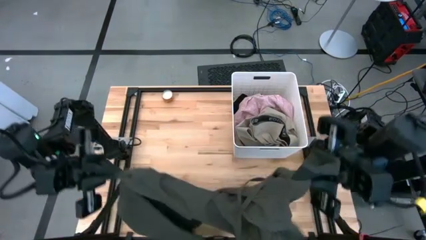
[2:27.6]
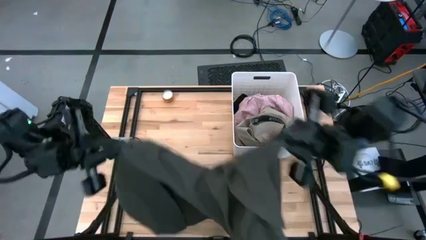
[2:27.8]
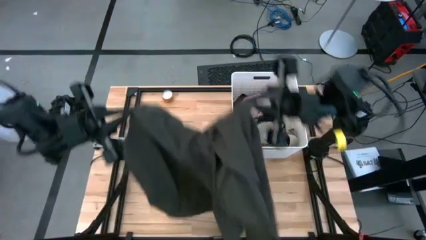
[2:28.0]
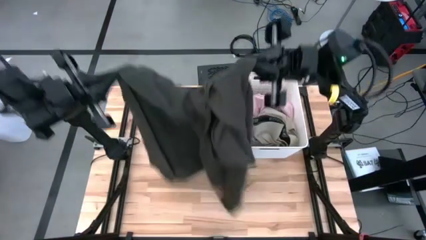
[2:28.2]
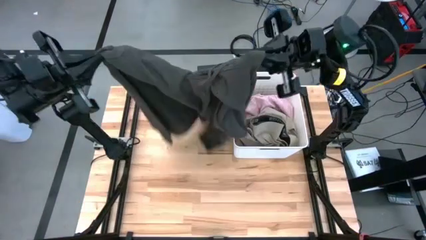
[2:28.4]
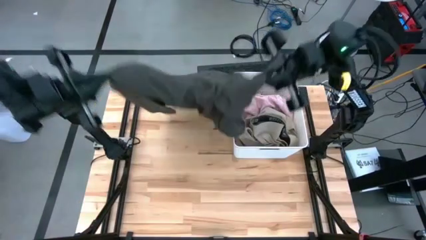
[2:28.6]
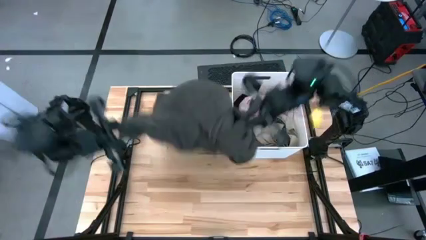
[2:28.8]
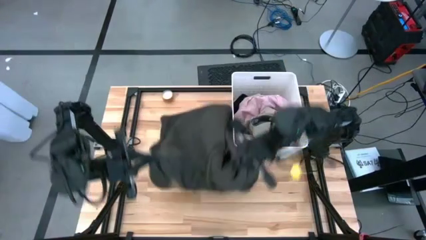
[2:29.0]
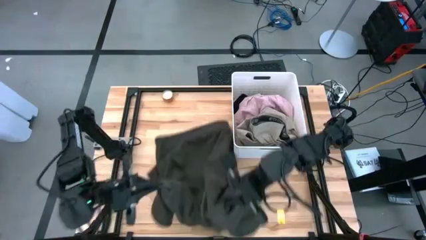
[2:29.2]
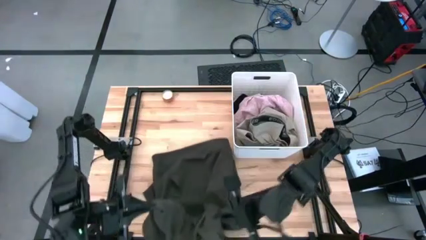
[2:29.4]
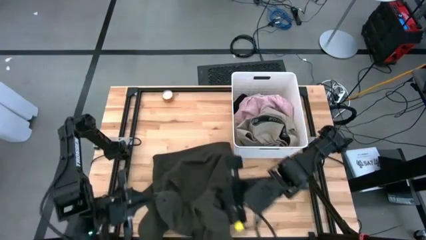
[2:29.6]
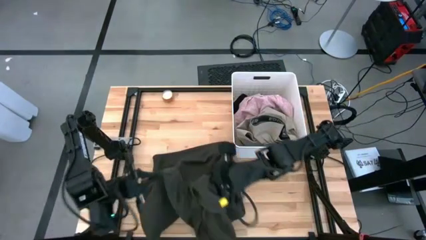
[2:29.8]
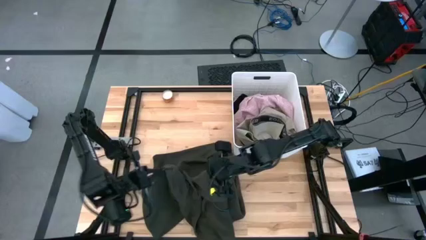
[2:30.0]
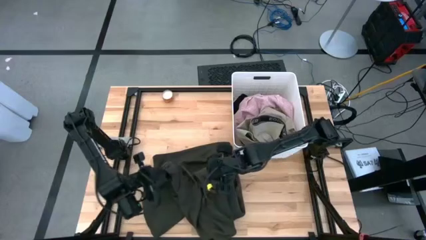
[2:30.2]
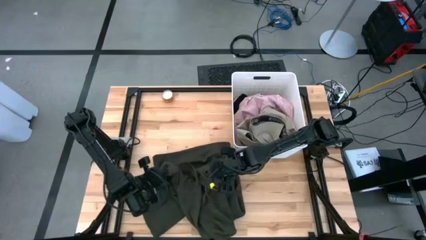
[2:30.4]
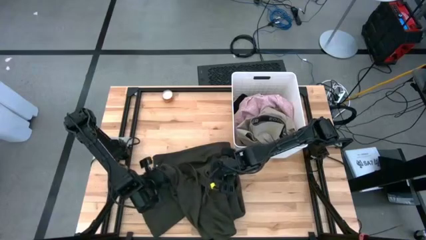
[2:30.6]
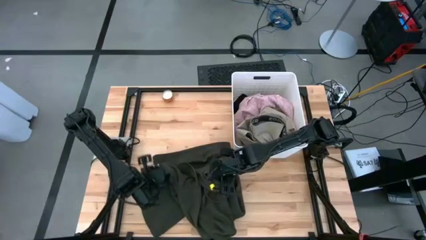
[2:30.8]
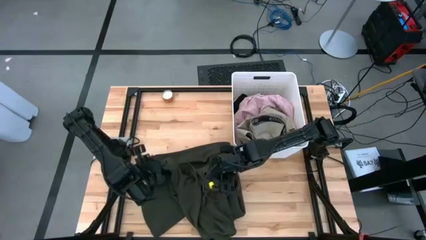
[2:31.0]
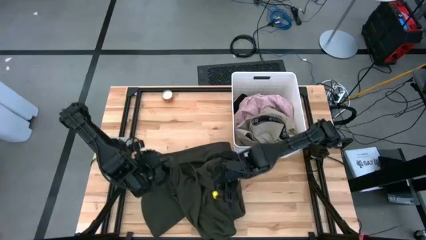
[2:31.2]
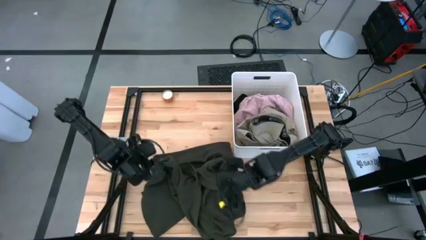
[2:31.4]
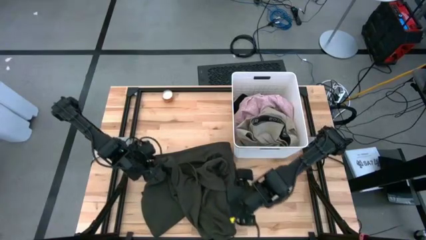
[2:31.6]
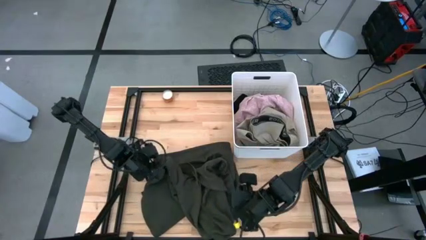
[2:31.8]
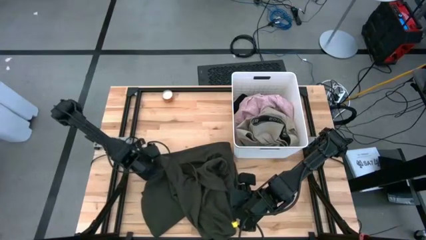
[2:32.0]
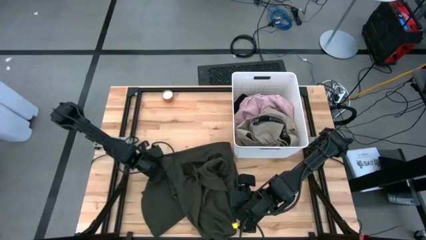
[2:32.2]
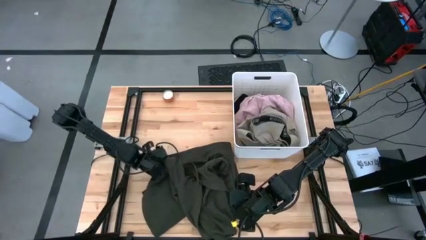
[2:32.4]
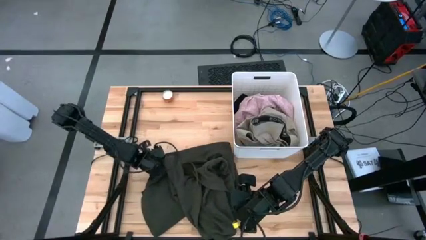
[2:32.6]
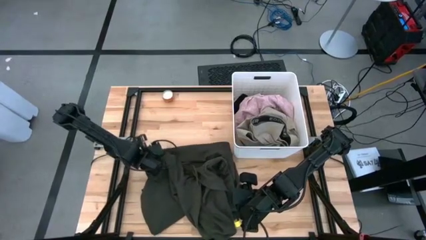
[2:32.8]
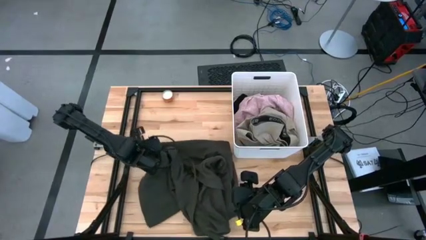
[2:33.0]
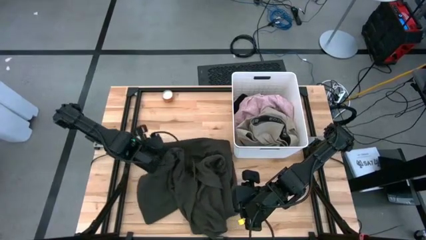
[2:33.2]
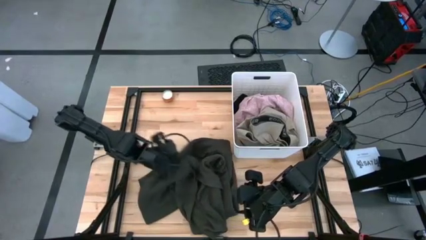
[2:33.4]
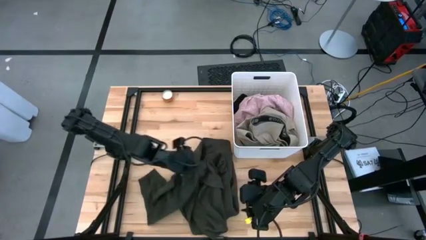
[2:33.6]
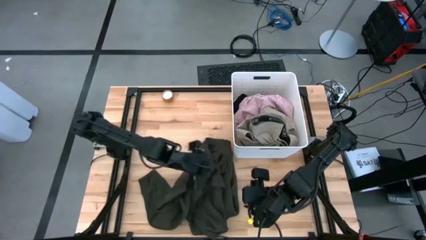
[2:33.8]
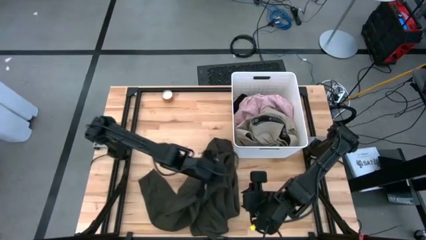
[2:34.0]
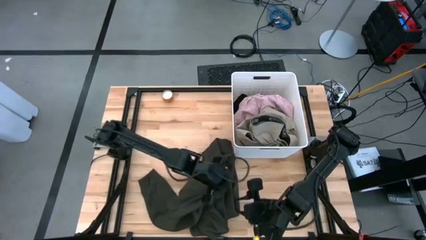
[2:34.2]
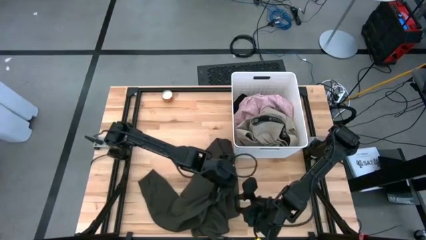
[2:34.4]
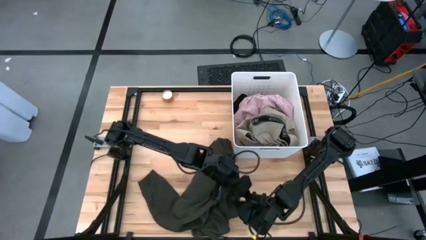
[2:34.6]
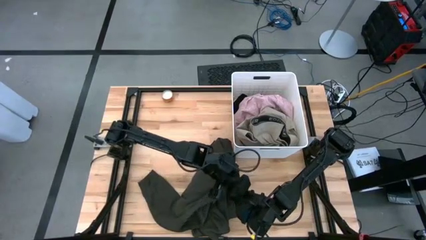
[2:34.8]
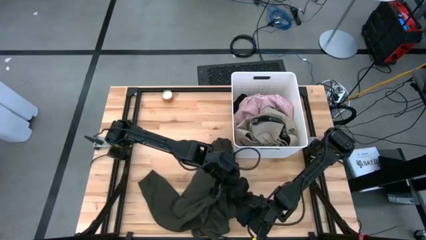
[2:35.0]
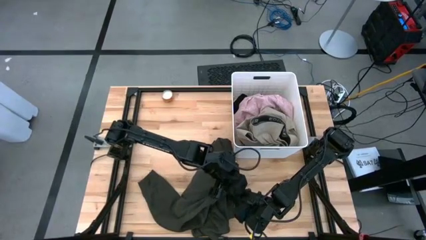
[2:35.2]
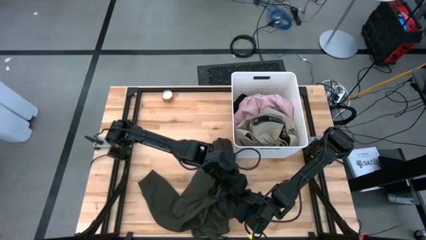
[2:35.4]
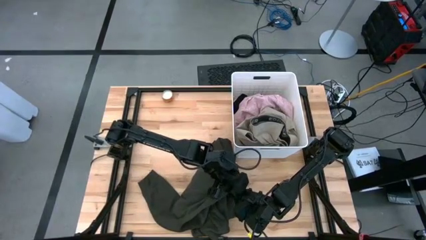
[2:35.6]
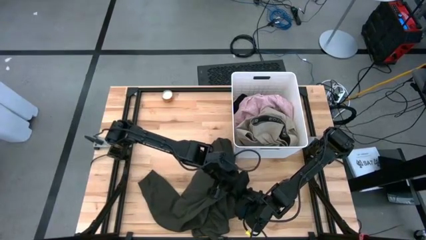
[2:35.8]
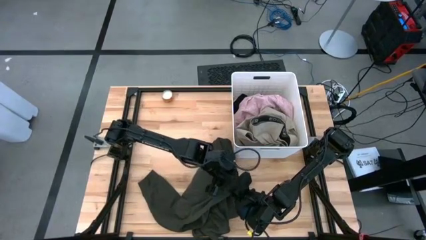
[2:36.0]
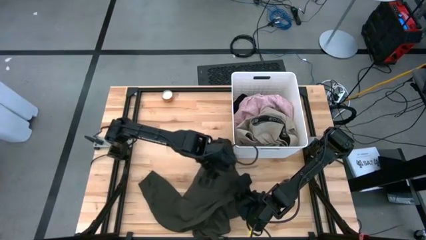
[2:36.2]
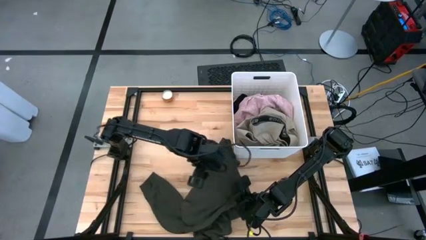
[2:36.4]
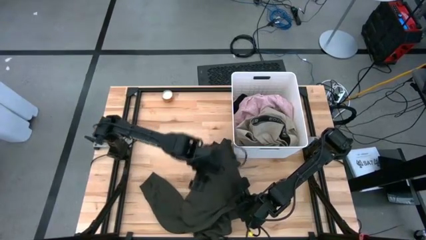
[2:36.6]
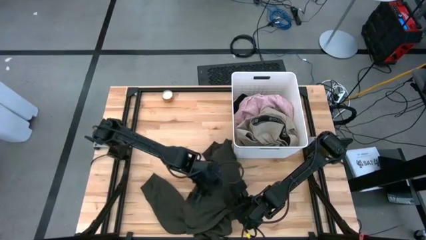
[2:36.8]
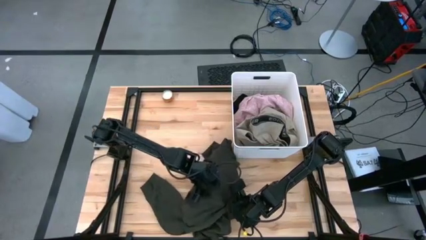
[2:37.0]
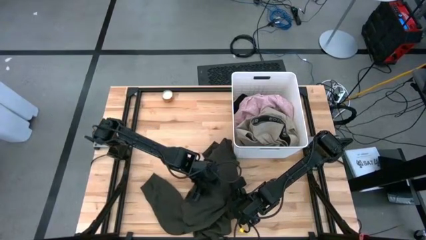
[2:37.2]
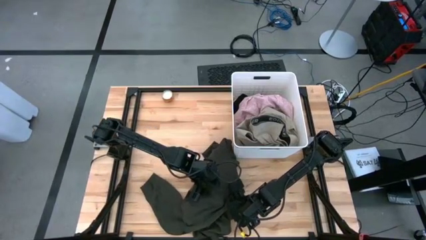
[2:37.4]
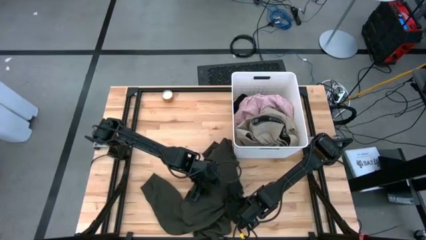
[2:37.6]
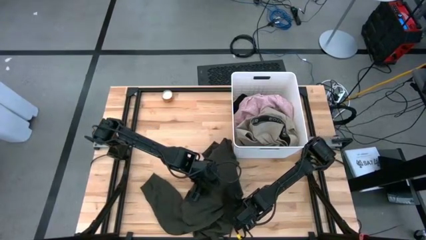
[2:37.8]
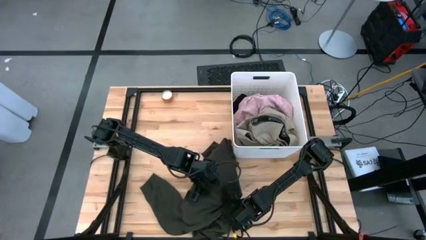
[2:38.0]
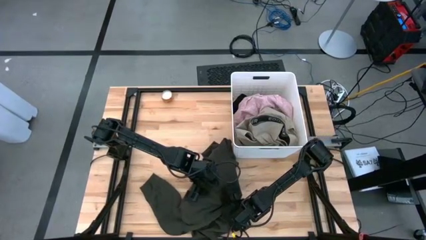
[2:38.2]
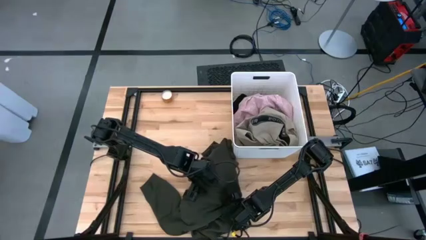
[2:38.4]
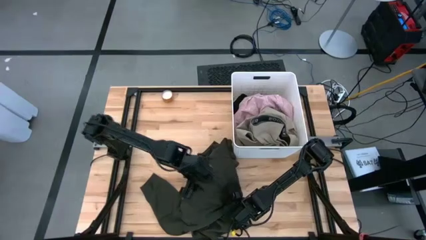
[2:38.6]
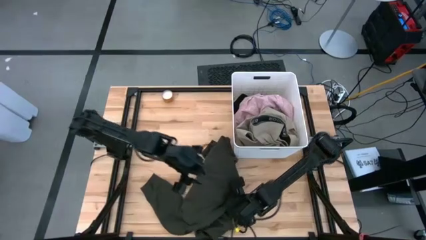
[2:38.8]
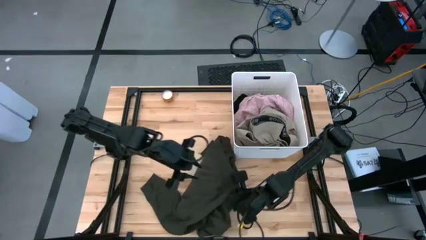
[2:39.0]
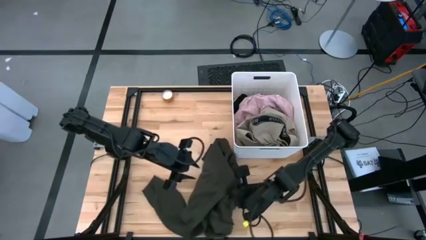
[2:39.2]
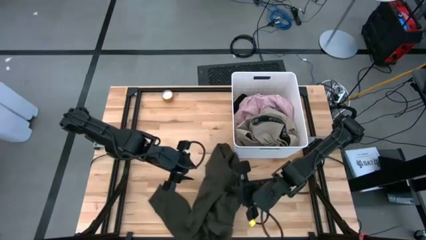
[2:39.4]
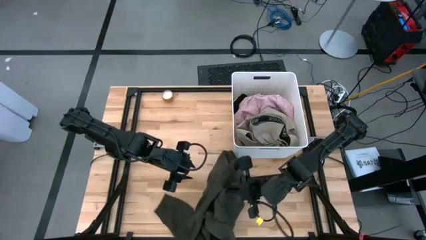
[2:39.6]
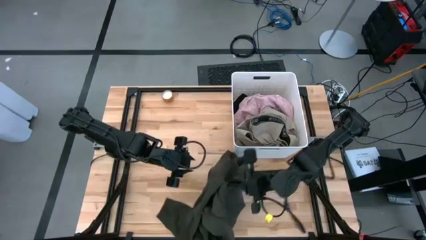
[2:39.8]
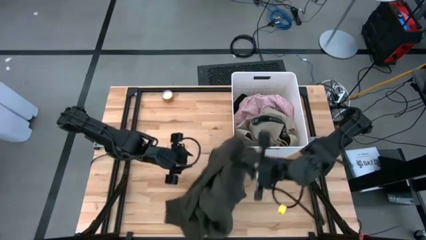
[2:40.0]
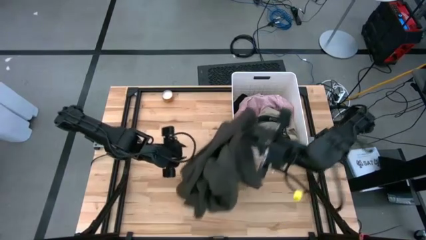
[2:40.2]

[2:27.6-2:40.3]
Task: Sort clothes
Put the black jacket into the laundry bin

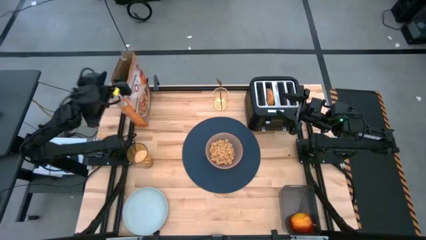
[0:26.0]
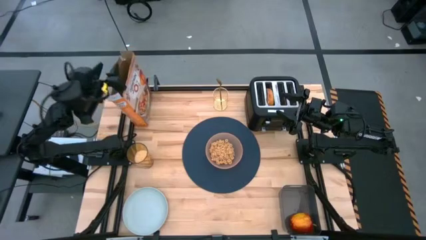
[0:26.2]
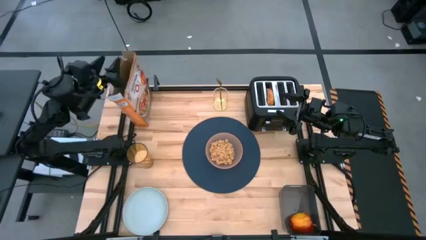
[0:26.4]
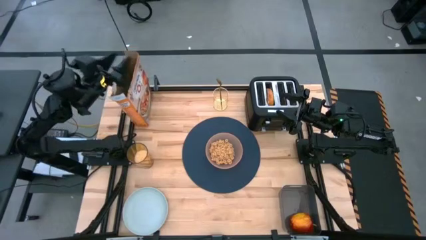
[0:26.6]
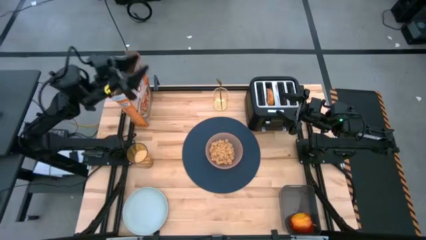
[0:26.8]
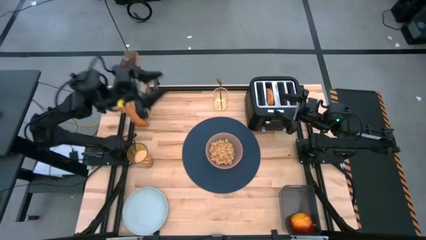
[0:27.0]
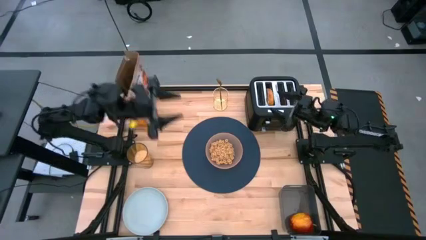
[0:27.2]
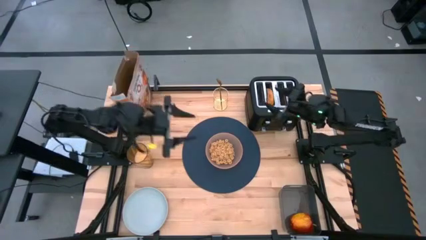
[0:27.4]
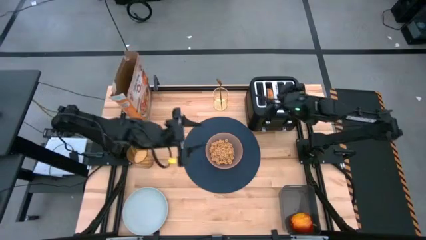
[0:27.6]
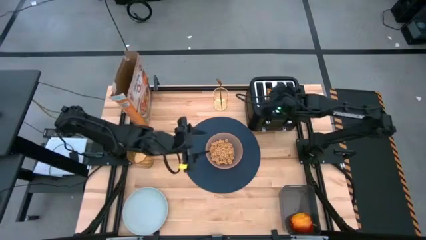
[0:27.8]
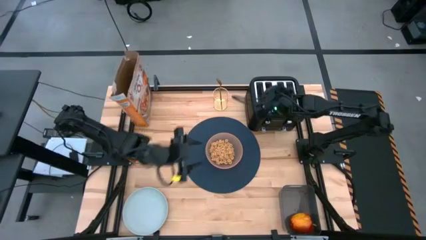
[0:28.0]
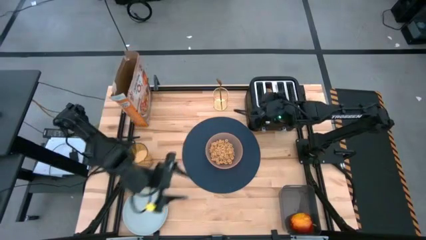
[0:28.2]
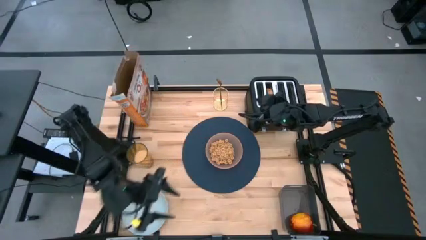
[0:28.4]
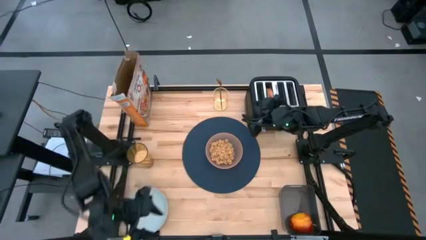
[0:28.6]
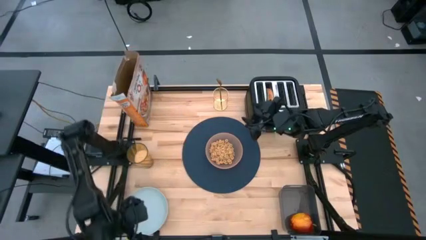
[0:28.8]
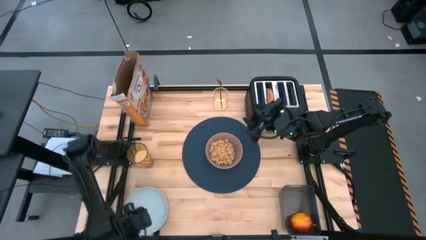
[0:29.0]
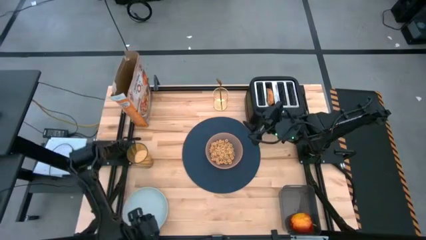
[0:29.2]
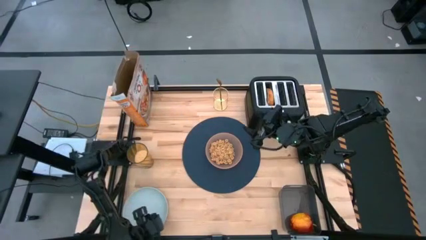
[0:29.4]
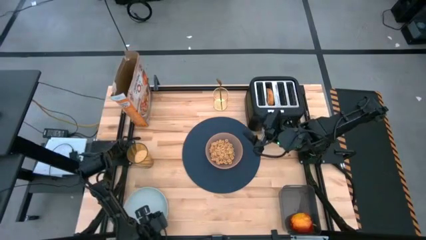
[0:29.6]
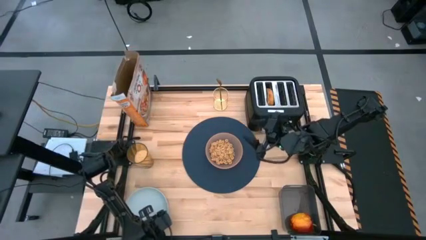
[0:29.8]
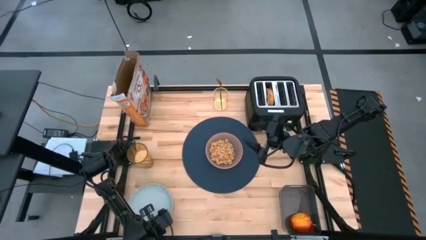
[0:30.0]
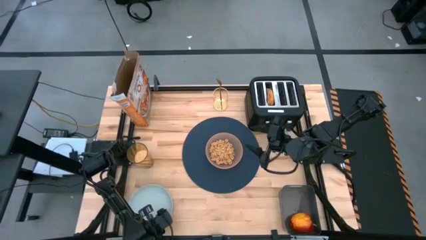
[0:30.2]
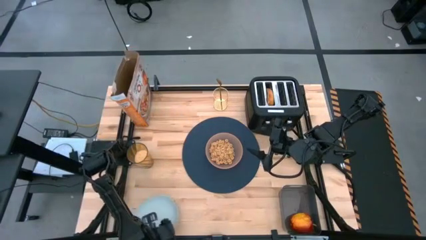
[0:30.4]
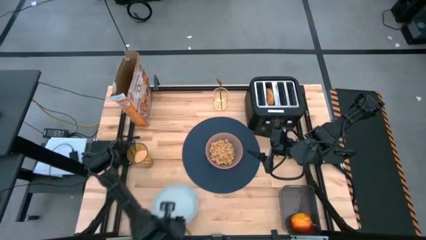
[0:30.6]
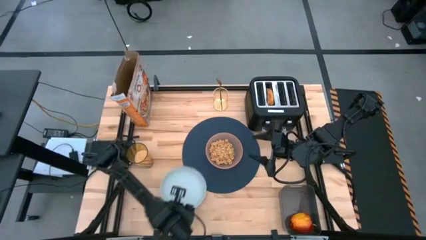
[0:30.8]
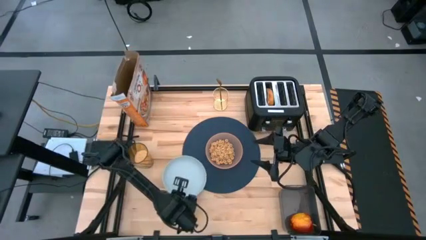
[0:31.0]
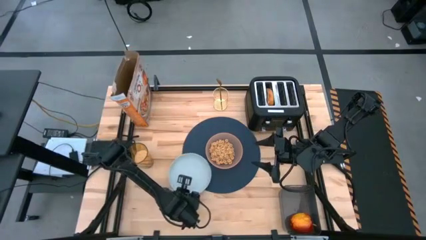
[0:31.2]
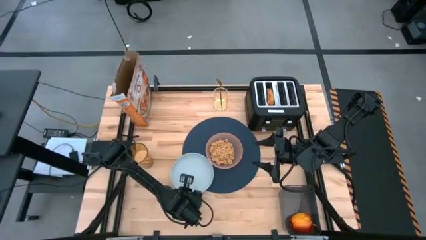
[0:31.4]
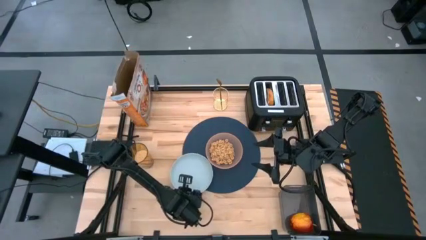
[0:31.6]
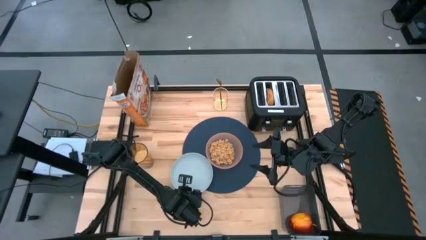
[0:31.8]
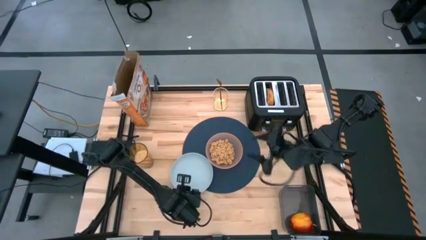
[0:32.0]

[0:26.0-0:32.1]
Task: Arrange a breakfast setting
Put the light blue plate on the blue table mat
